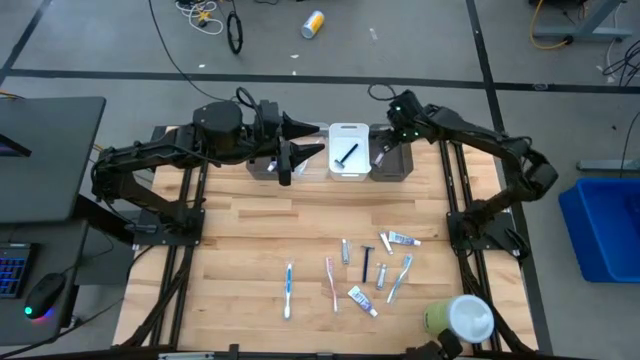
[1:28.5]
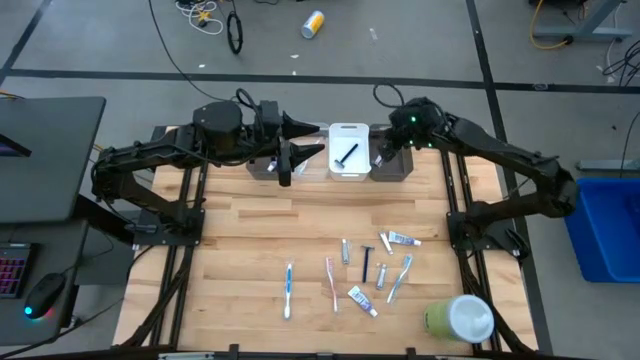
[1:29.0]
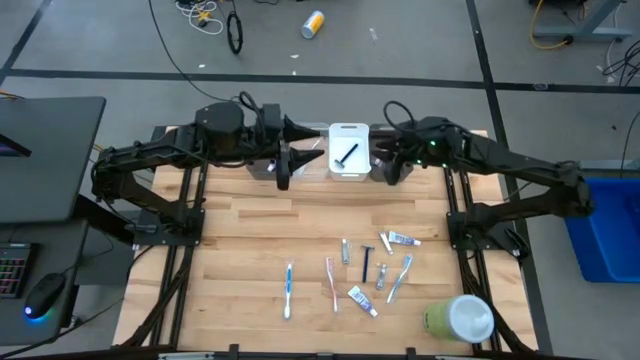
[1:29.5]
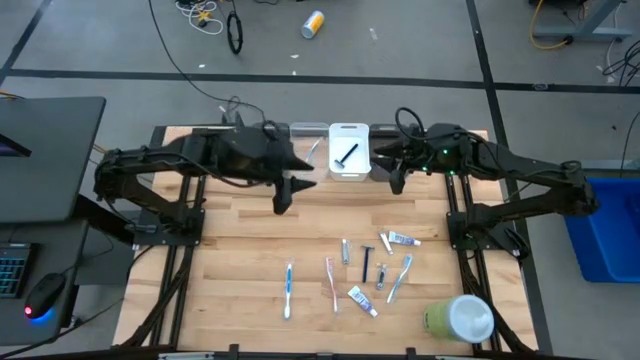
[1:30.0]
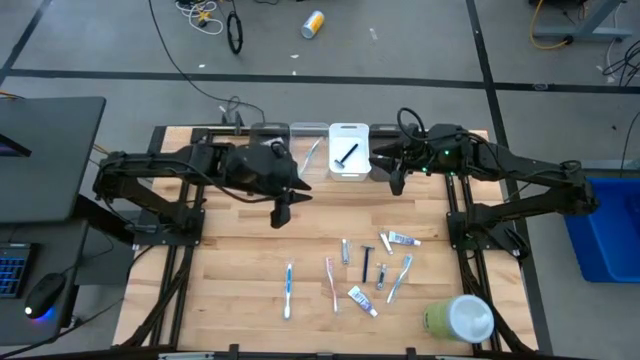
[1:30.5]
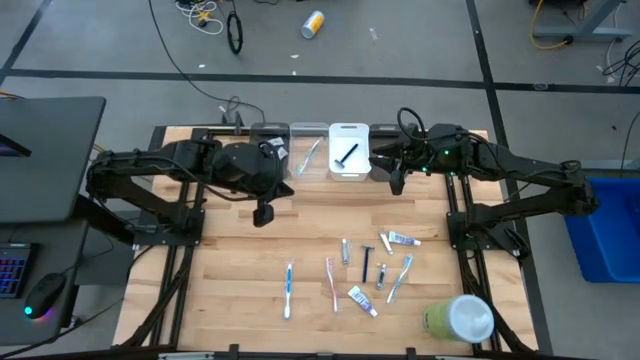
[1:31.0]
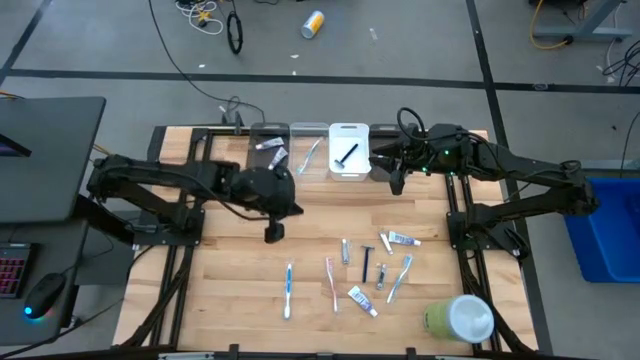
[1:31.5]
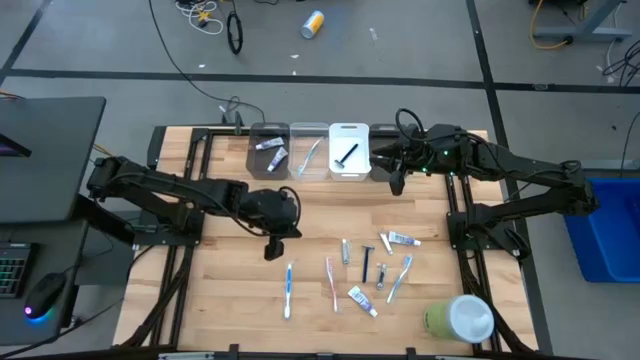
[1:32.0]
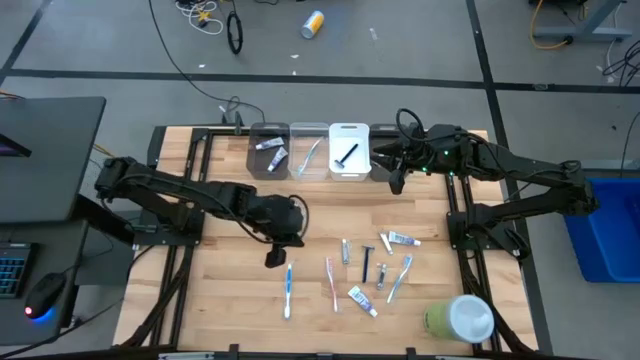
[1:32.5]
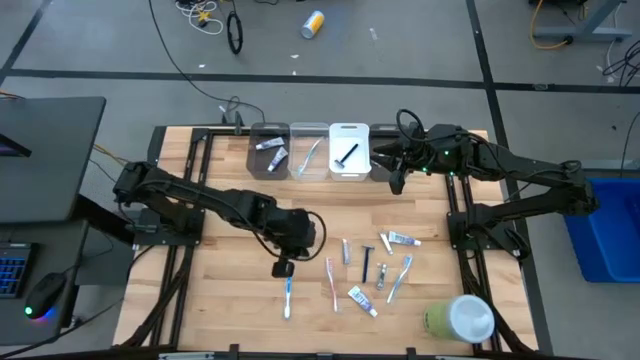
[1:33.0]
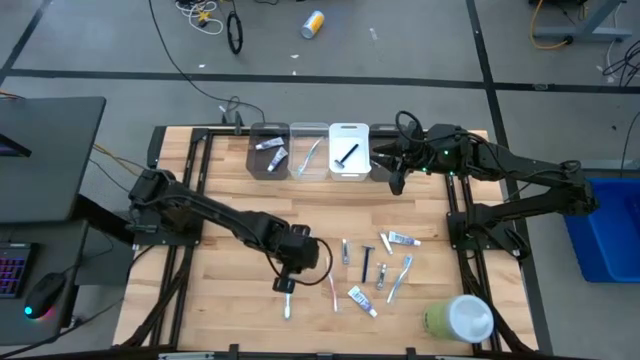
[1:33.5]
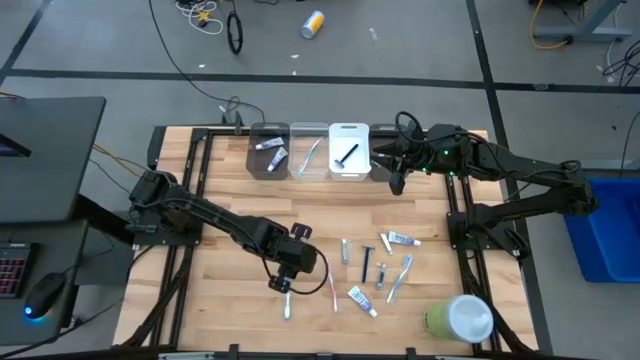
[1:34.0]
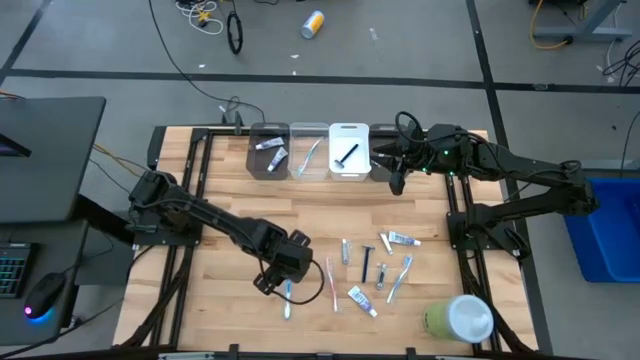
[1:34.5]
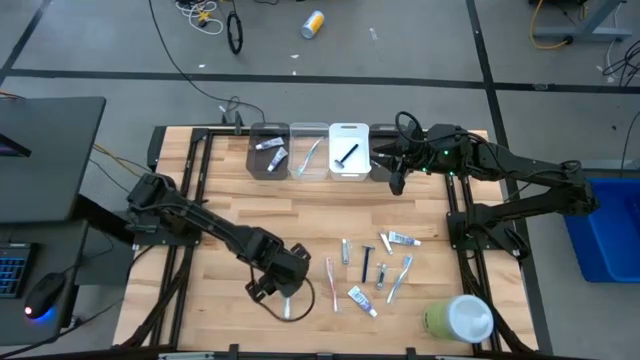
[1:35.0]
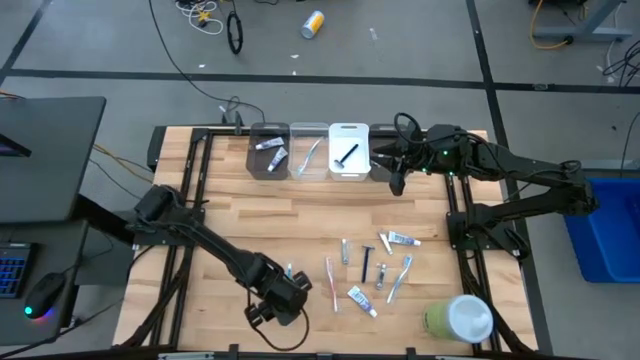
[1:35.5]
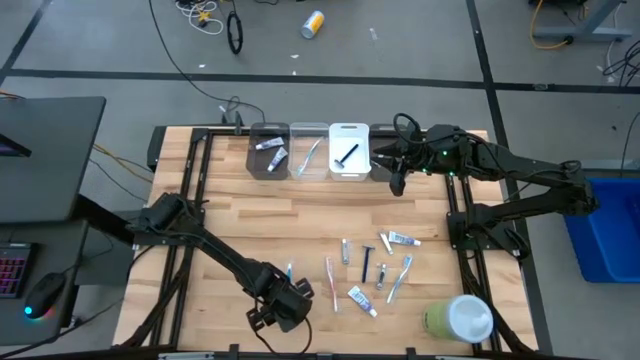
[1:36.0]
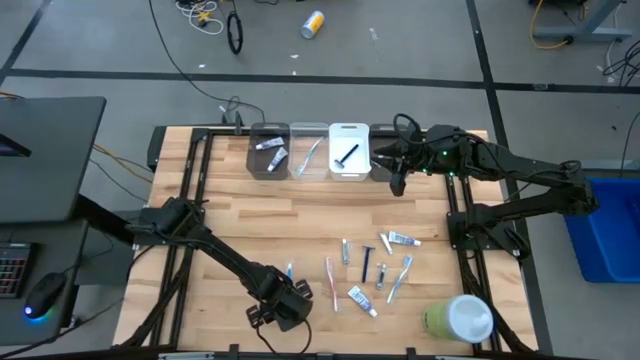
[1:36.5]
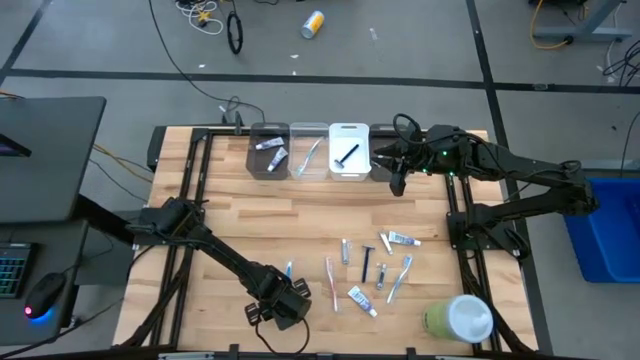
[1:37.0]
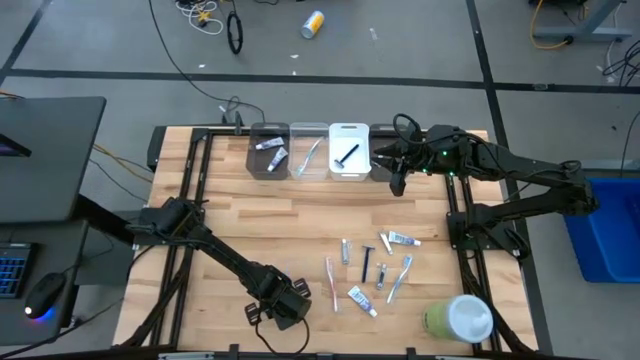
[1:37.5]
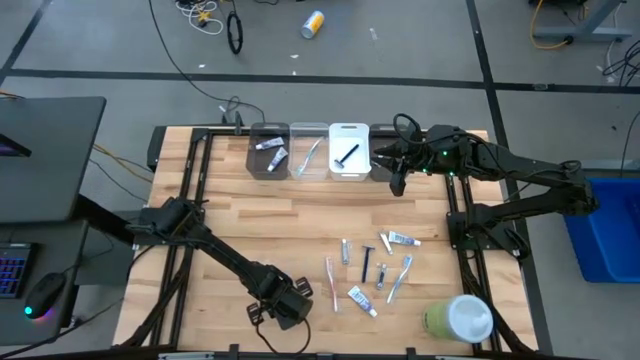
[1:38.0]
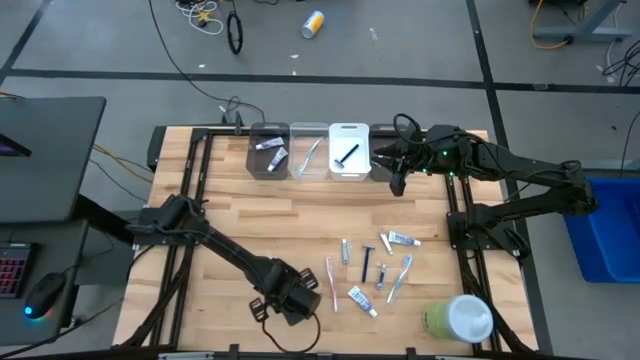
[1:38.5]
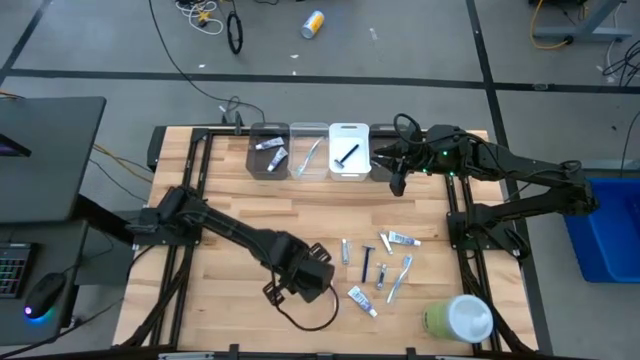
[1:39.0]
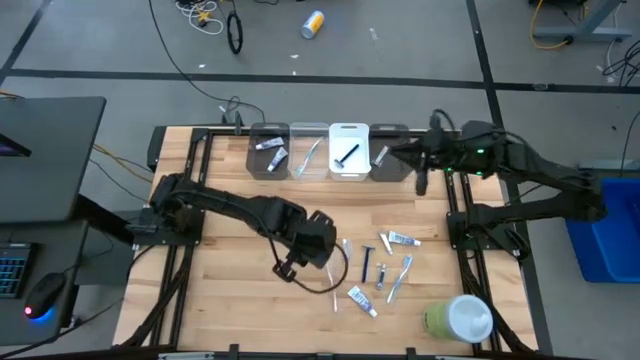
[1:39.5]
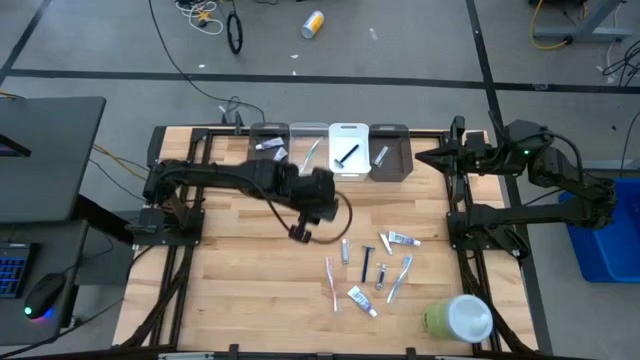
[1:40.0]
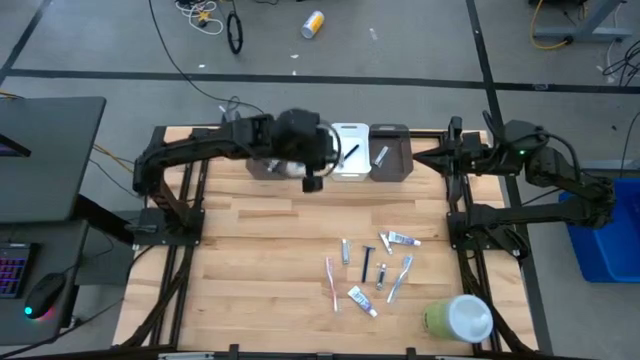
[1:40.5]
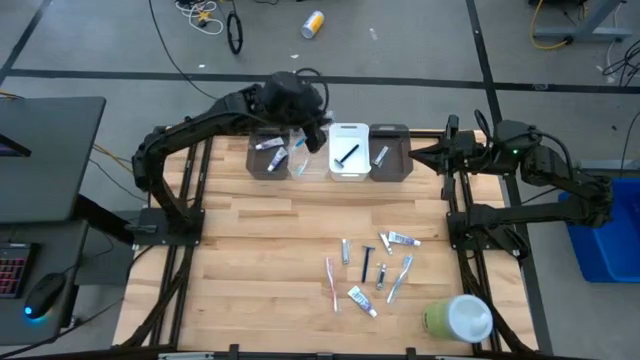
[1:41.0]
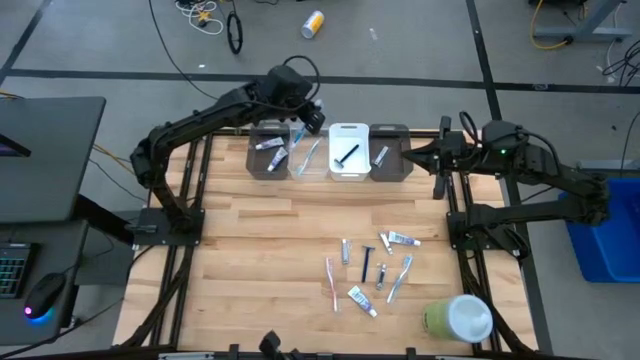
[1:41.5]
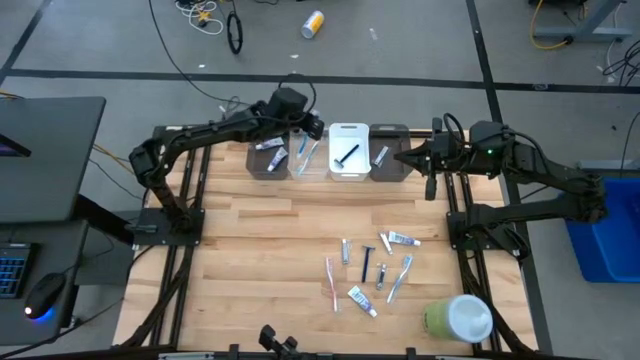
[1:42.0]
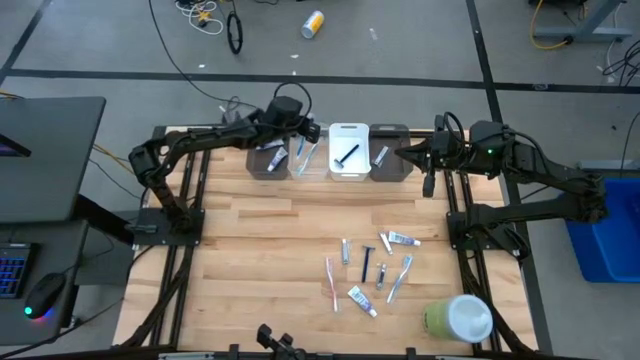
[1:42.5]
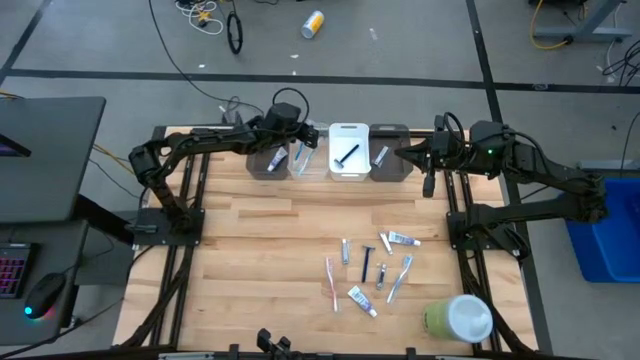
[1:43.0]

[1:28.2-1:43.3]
Task: Pick & Place Travel size toiletries
Put the blue toothbrush into the transparent bin

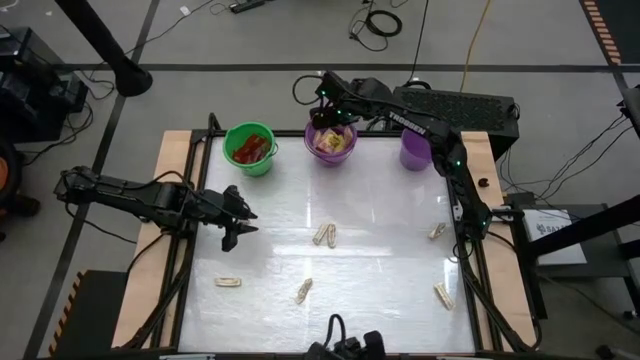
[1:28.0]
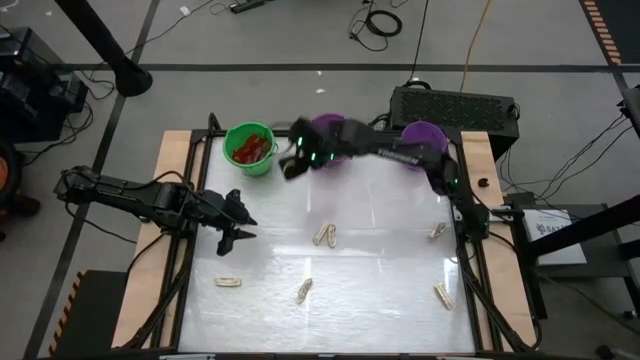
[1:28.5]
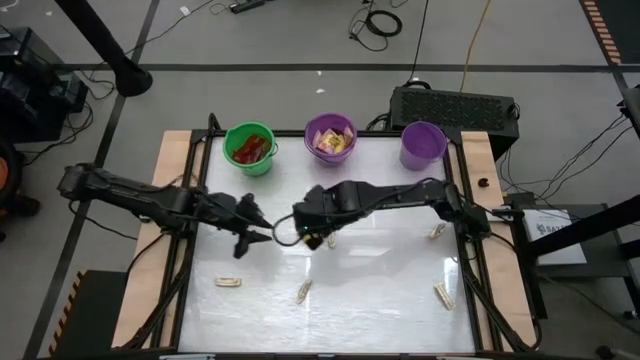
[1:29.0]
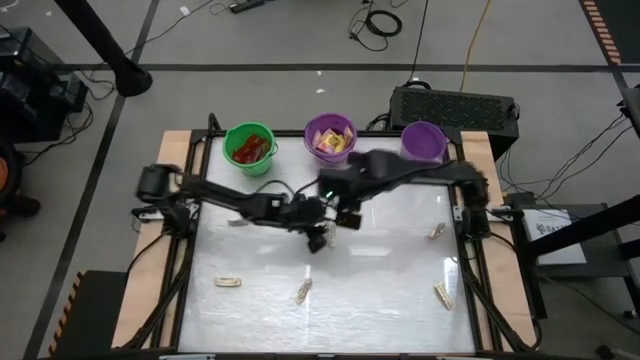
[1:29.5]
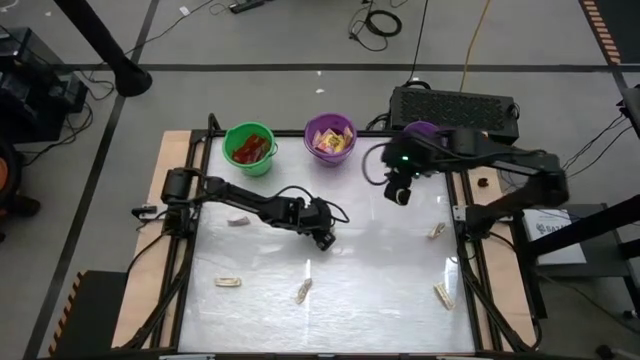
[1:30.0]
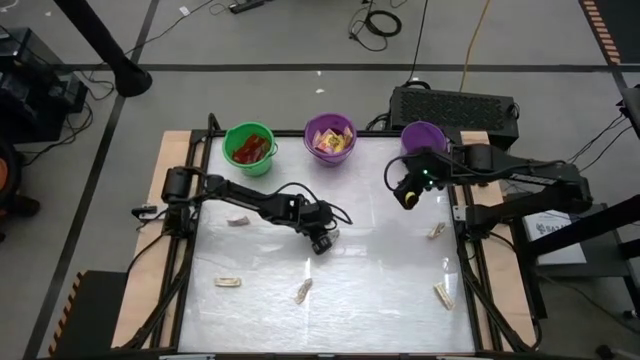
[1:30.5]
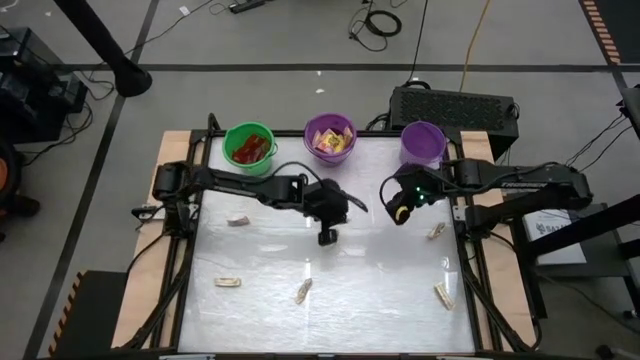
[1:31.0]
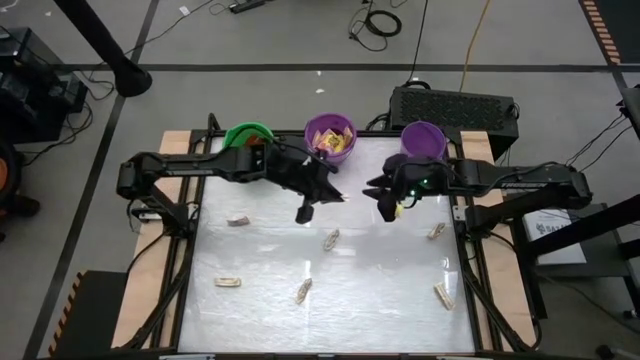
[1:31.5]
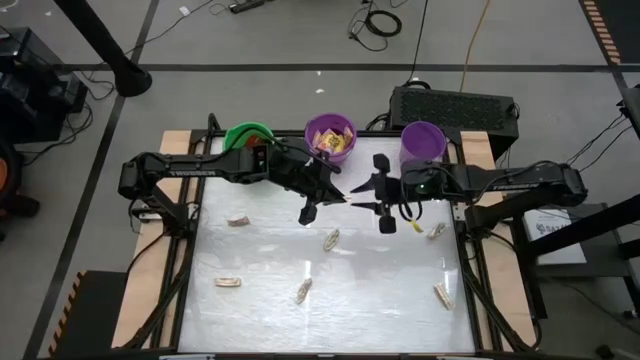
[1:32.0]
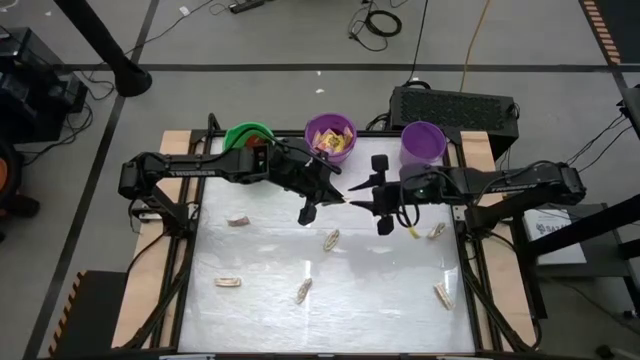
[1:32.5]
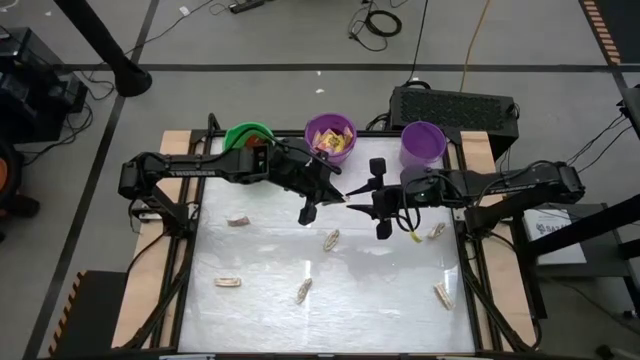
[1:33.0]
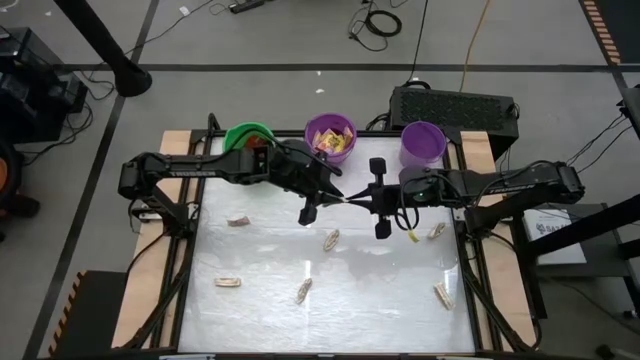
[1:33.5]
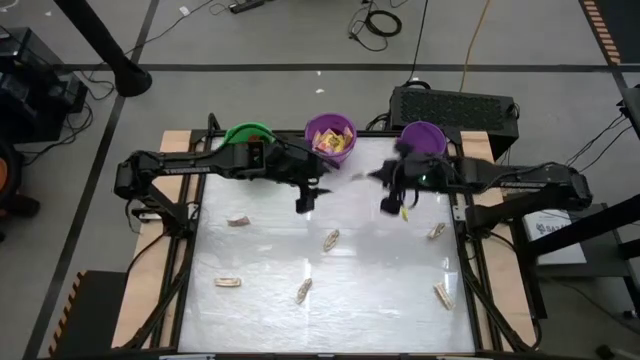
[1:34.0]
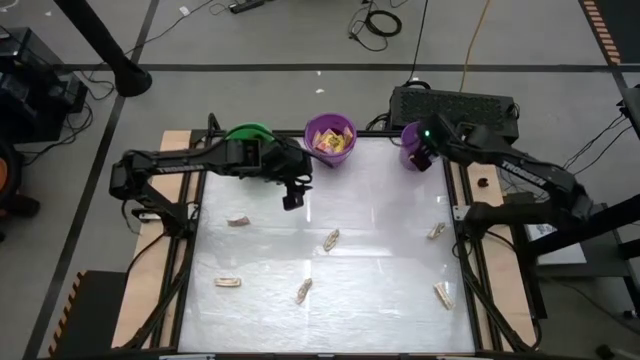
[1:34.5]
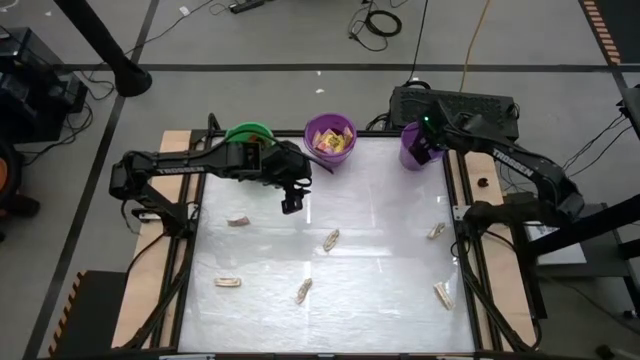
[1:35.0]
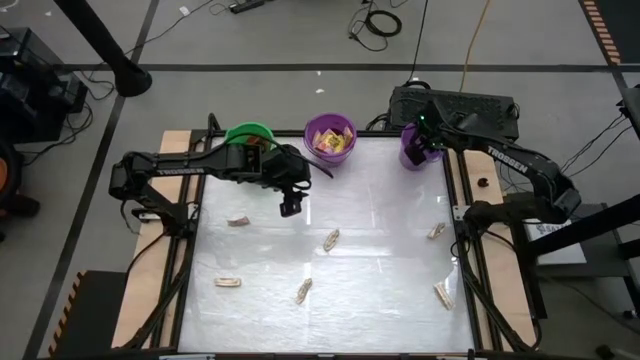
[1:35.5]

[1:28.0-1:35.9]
Task: Sort candy by brand, put in halloween buckets
Put the white candy pack in the right purple bucket
